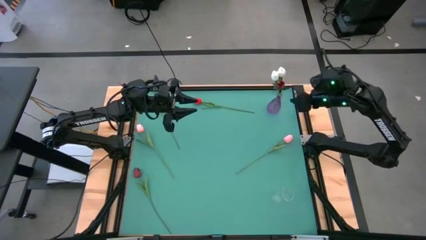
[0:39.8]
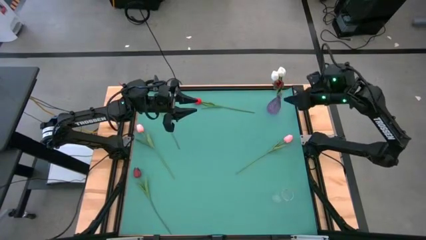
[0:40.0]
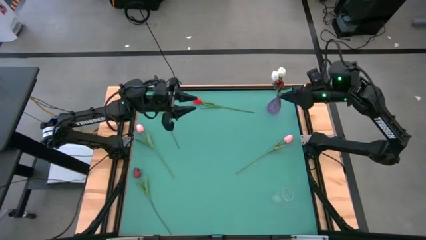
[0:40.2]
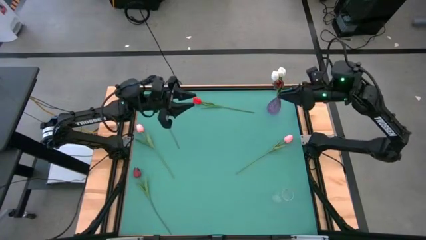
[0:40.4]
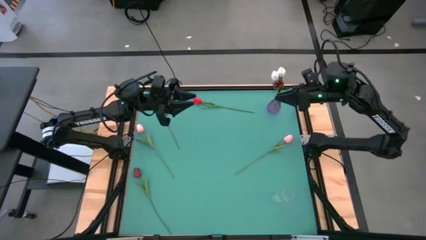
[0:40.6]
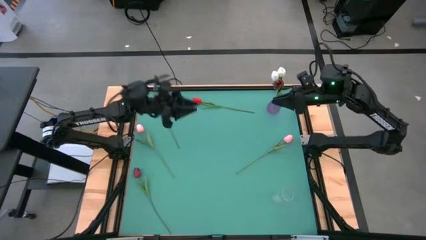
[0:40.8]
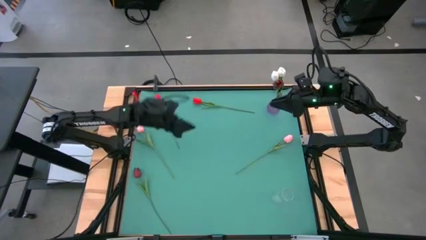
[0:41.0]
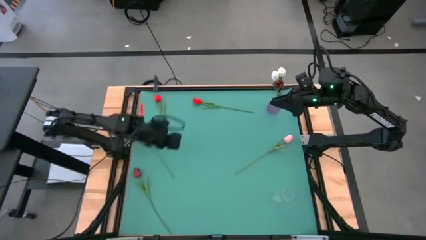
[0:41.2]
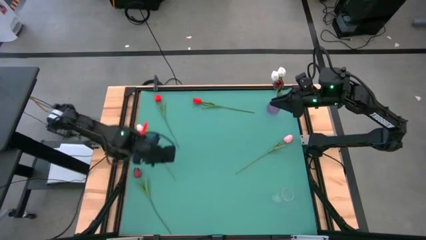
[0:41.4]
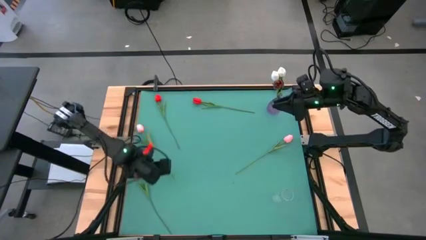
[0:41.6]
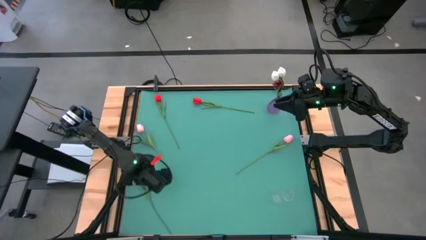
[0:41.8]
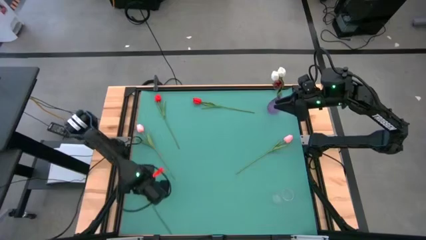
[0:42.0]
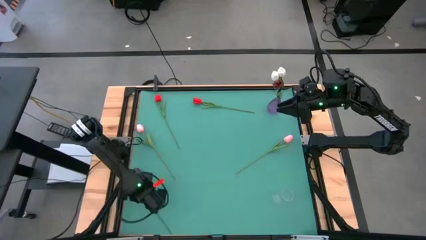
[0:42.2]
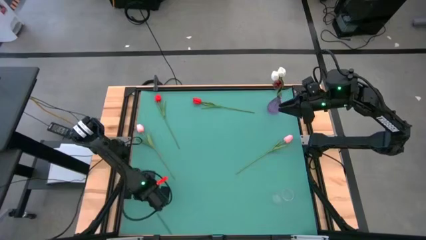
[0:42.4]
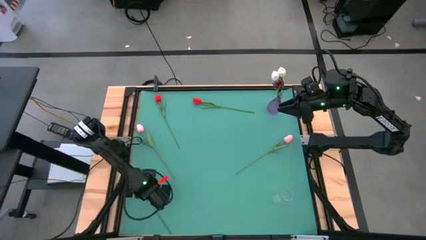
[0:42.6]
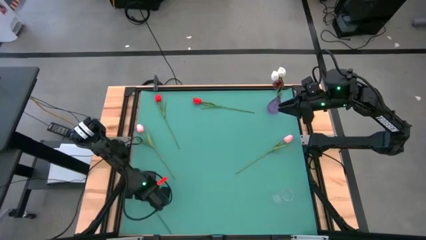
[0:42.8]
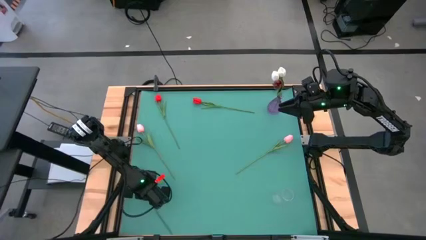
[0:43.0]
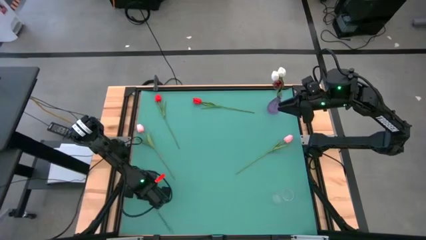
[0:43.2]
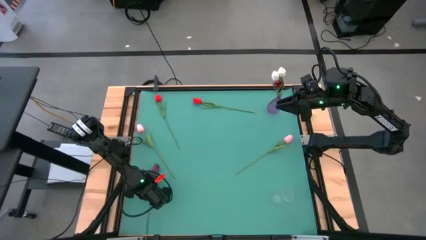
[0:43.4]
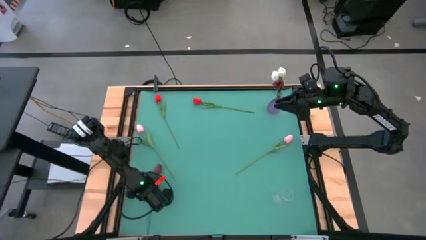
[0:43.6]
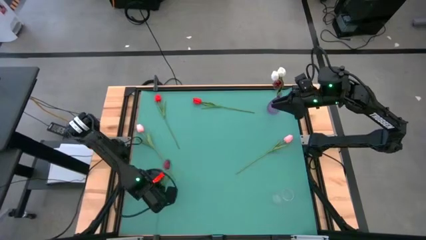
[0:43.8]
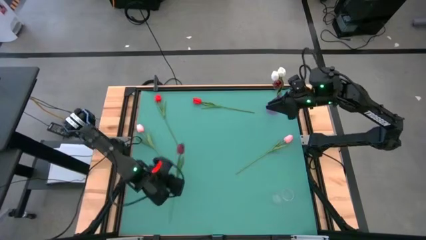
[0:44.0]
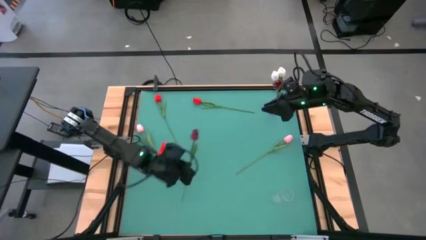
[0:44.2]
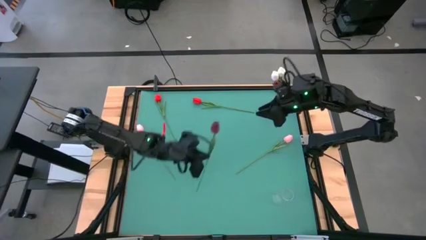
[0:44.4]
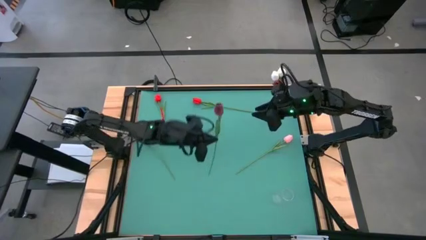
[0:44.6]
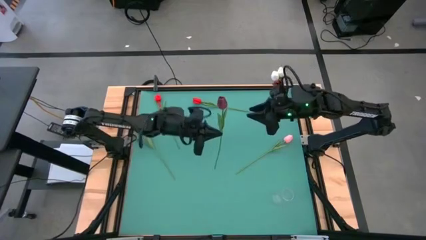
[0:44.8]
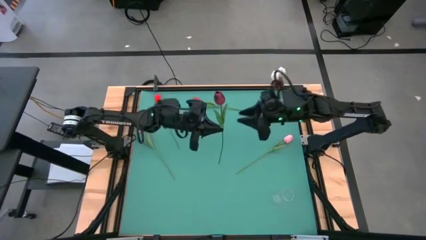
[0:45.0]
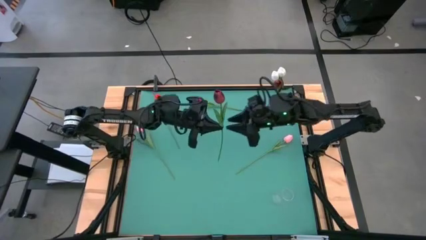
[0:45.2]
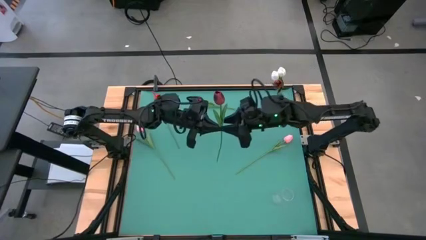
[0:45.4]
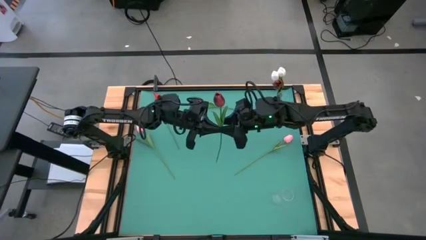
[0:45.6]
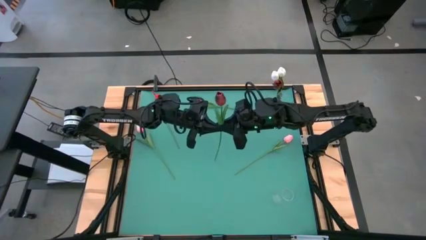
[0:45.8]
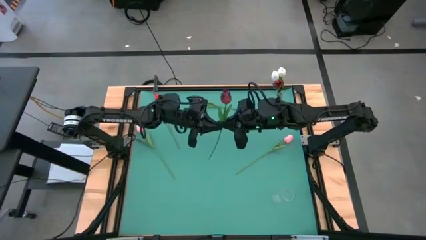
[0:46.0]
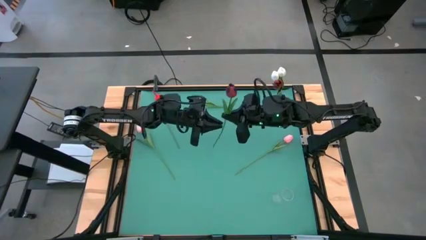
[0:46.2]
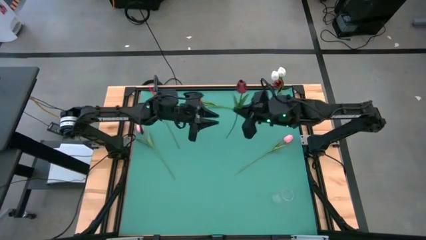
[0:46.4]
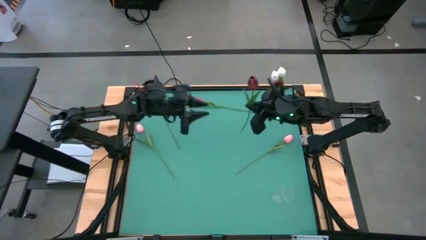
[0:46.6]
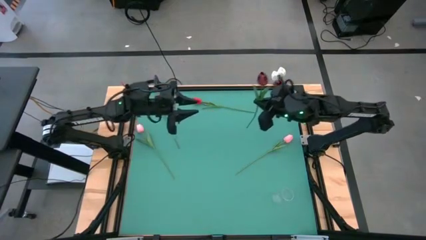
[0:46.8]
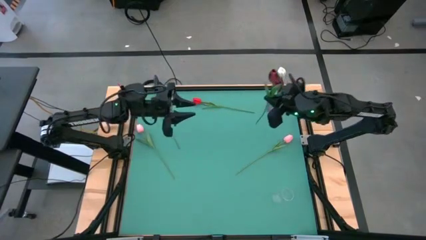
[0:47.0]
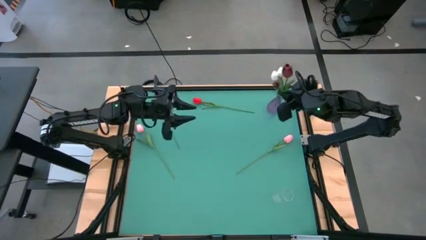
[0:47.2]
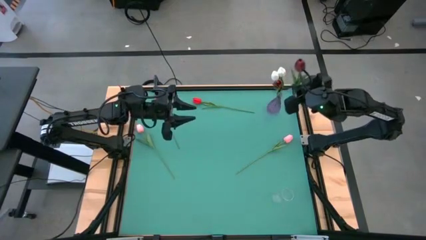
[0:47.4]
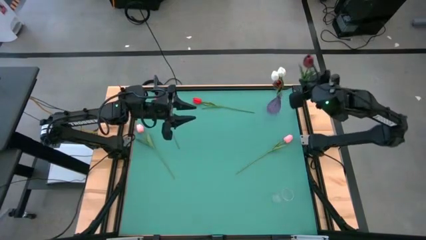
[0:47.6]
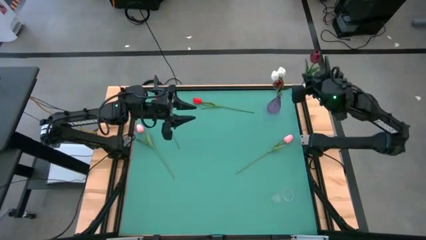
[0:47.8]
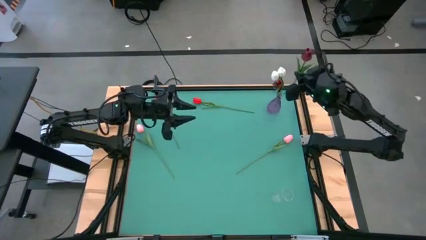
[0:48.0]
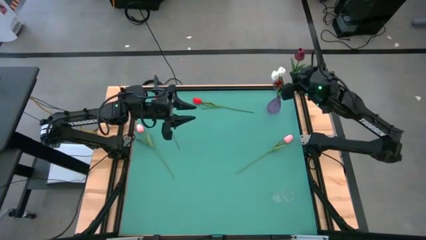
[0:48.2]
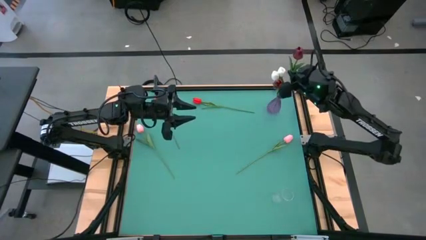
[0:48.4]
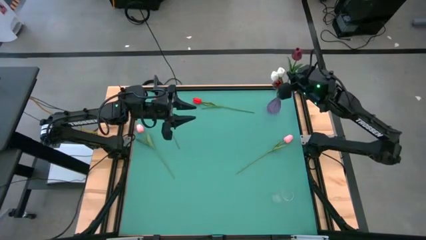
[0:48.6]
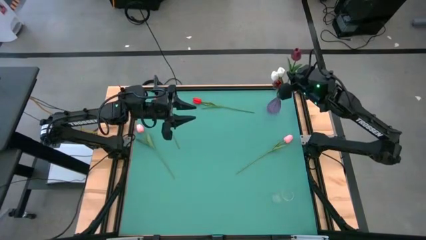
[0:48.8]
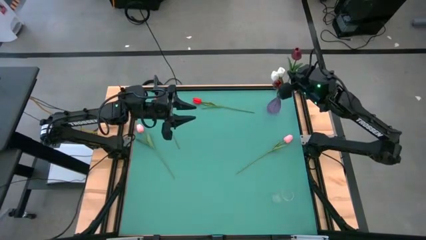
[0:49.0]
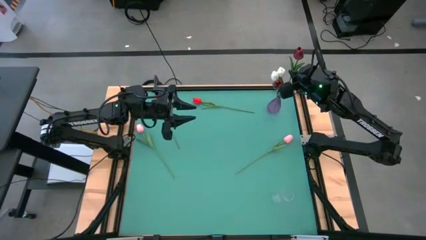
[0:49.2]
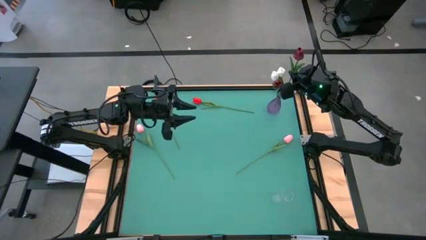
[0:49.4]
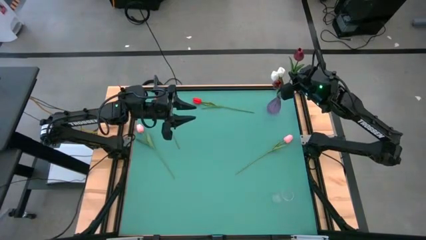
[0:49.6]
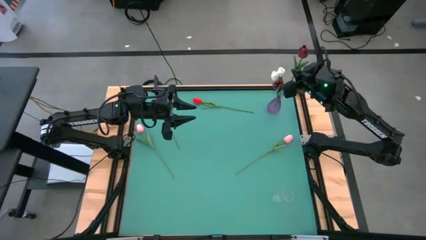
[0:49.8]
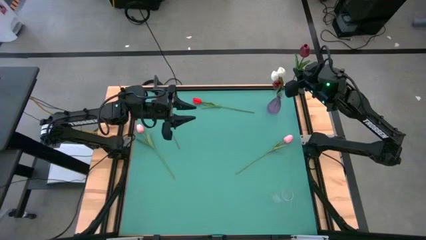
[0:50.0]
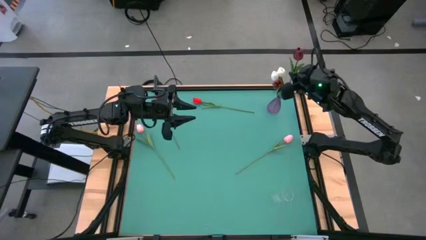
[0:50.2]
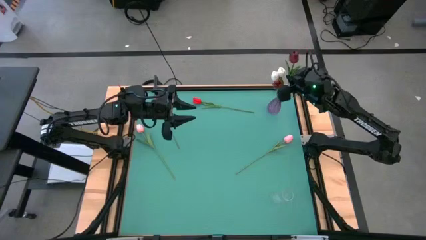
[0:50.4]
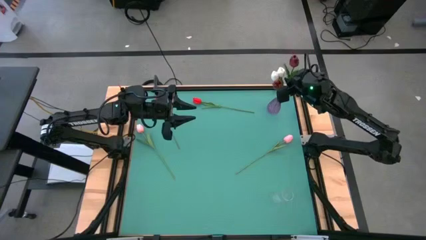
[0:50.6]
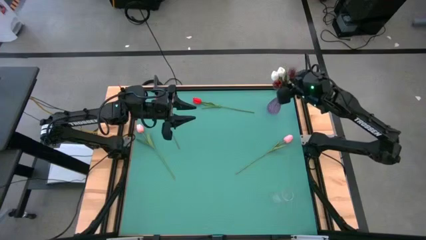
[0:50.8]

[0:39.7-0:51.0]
Task: Sort flowers into vase by color
Put the dark red flower into the violet vase

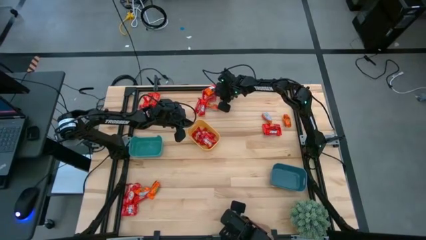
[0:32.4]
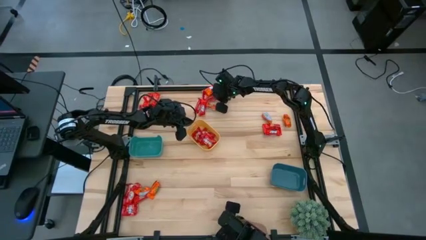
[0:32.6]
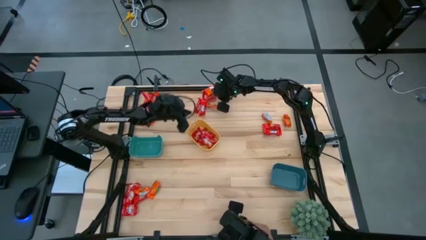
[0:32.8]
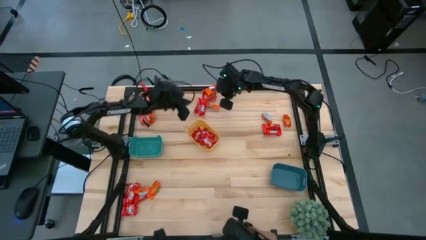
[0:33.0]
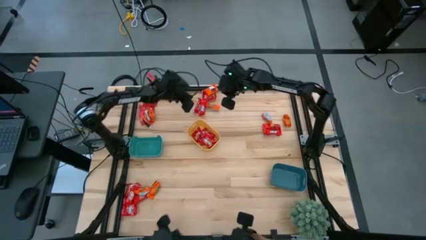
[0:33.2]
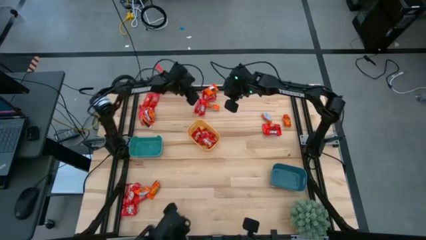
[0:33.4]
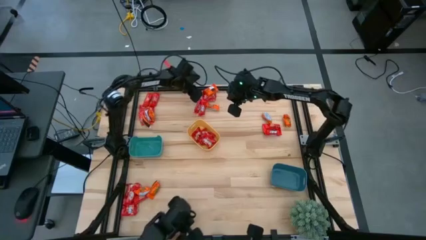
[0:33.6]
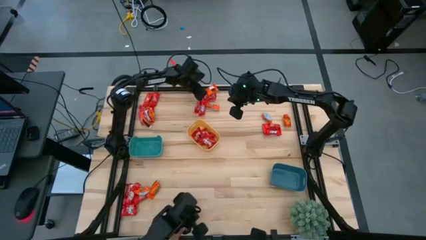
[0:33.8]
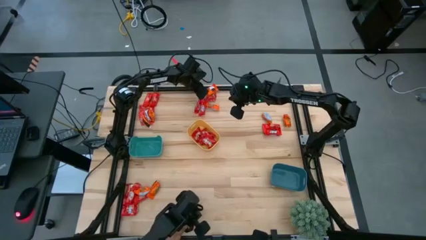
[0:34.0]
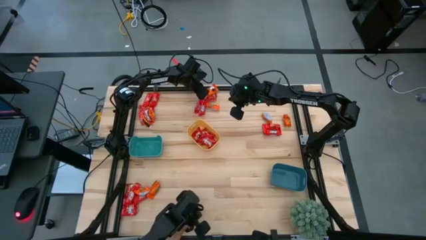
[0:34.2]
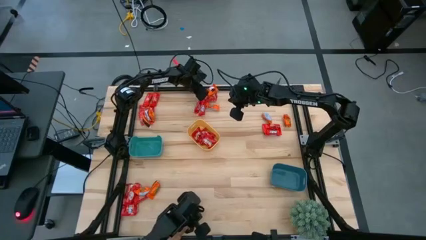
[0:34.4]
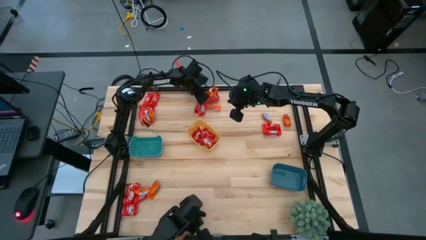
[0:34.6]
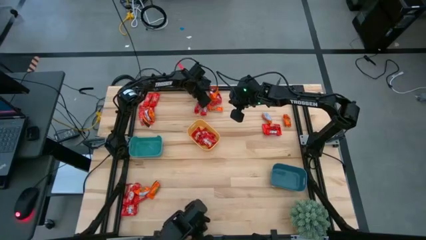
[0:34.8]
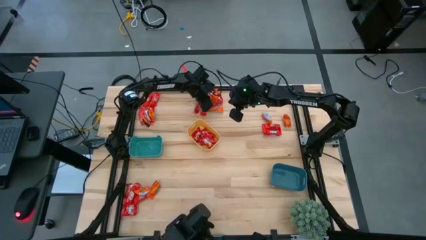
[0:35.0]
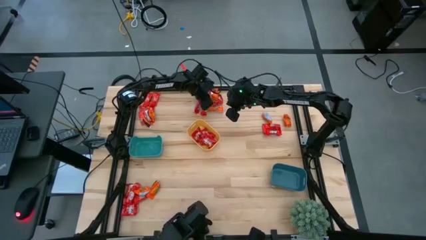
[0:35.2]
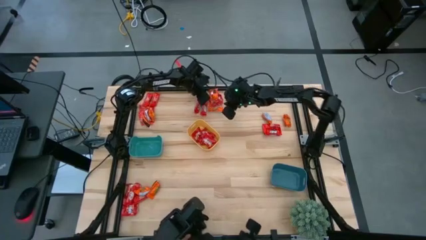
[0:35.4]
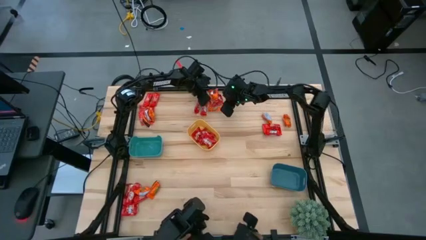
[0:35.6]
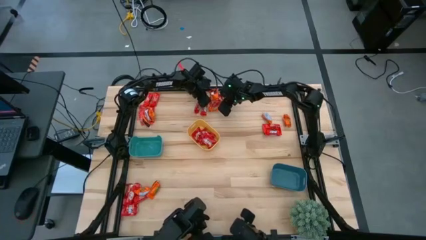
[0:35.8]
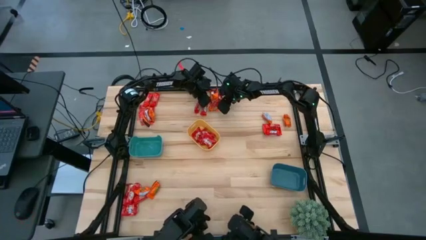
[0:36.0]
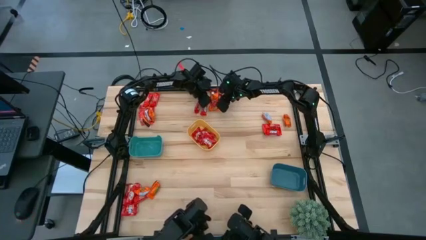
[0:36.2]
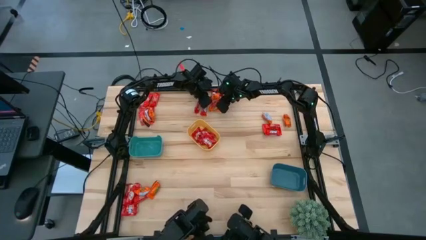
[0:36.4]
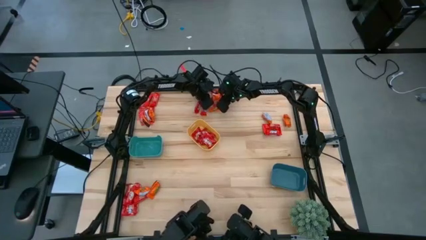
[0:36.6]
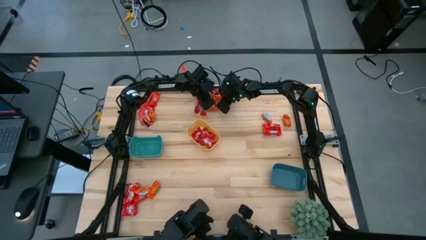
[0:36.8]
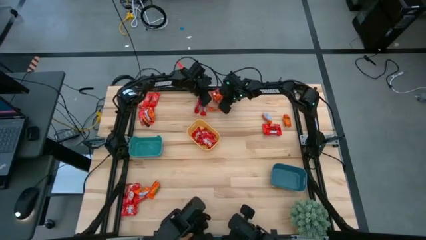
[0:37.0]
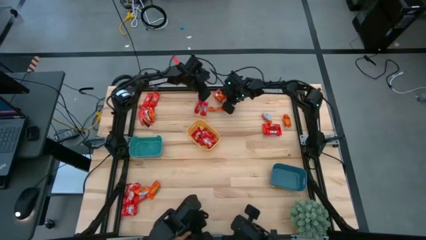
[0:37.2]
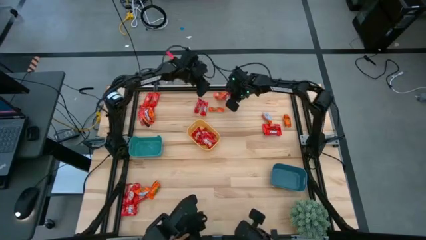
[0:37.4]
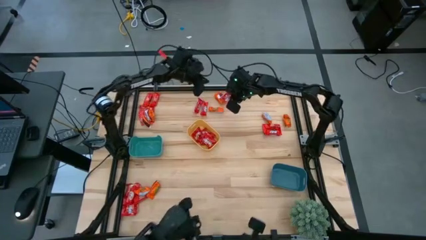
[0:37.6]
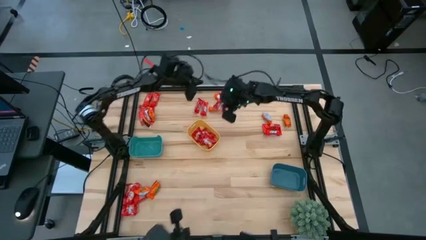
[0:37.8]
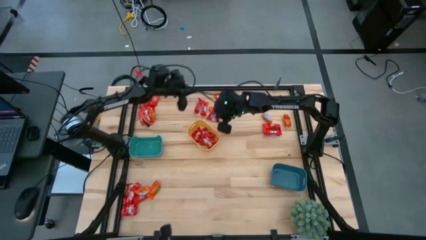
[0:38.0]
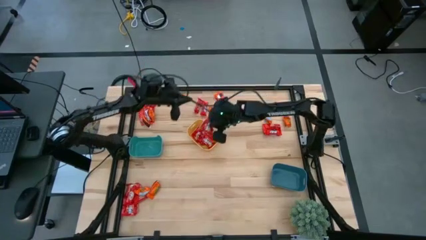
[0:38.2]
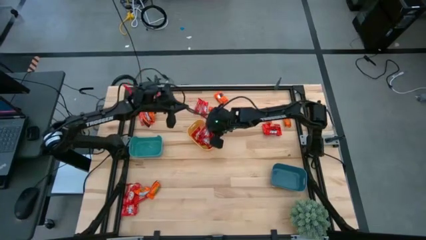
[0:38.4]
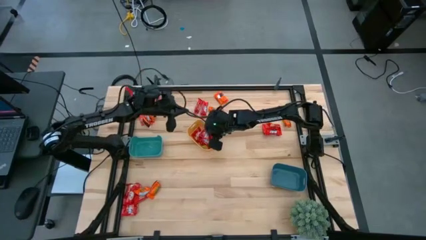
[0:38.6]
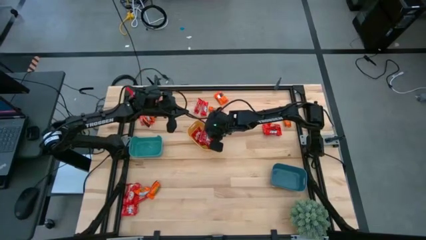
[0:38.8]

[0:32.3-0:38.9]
Task: Sort candy
Put the red candy into the yellow bin
